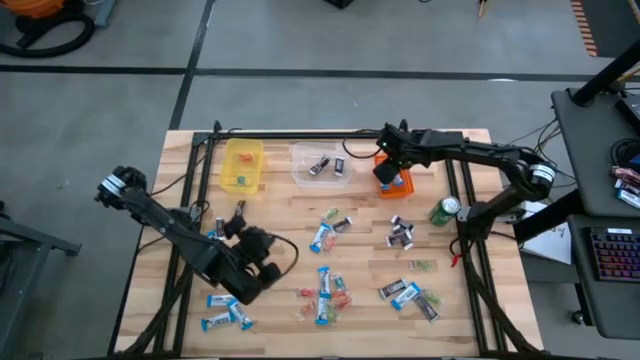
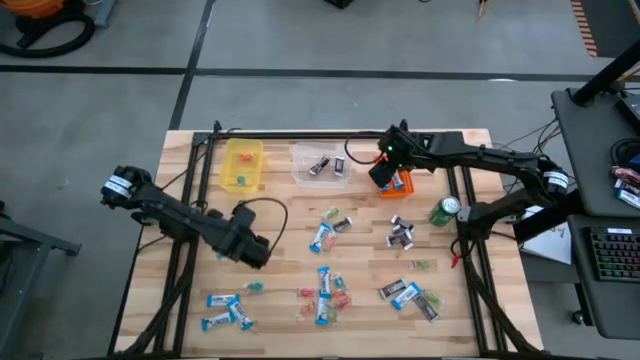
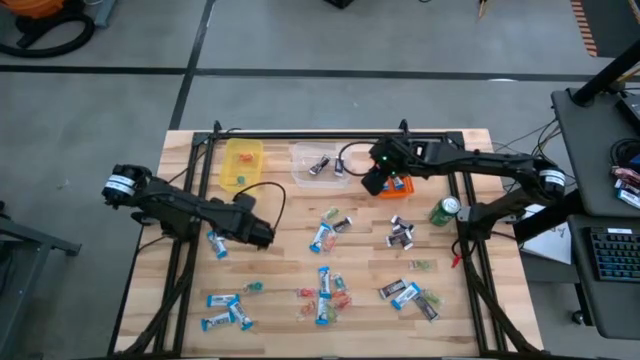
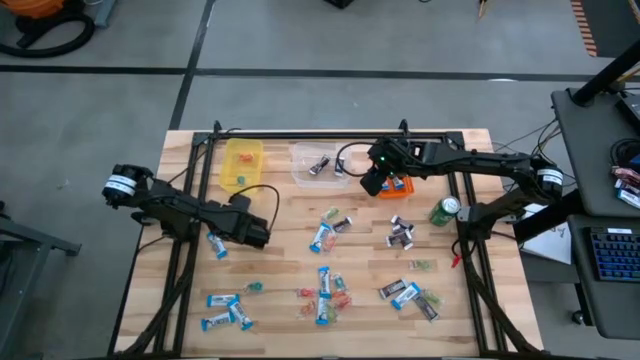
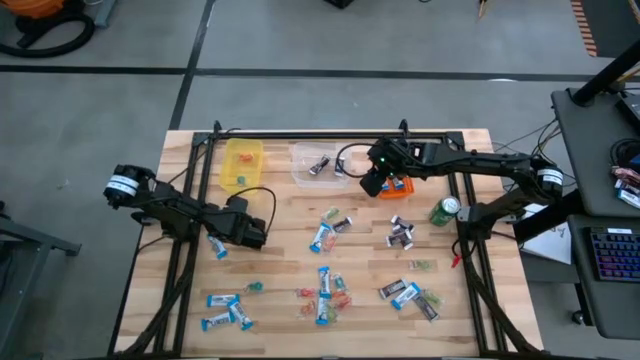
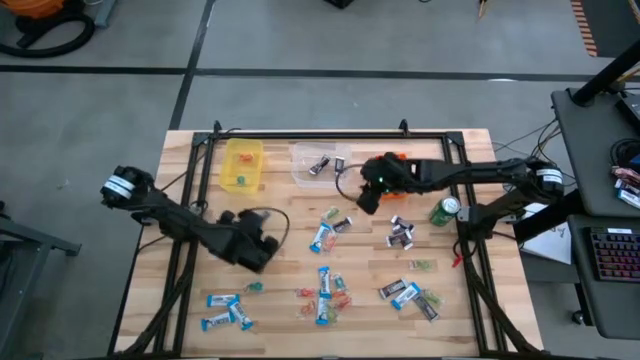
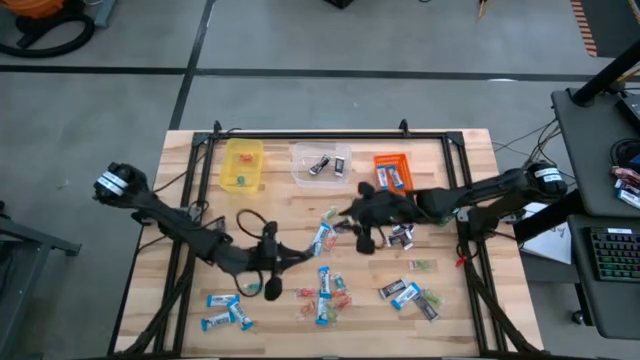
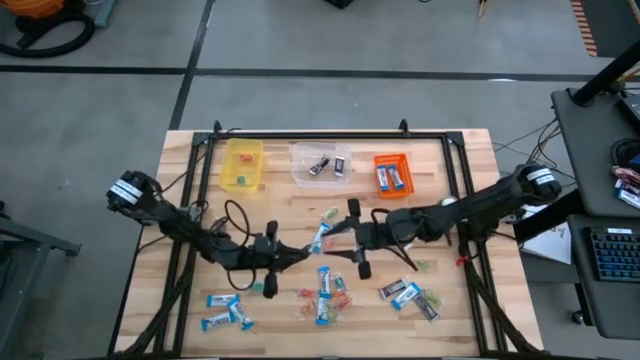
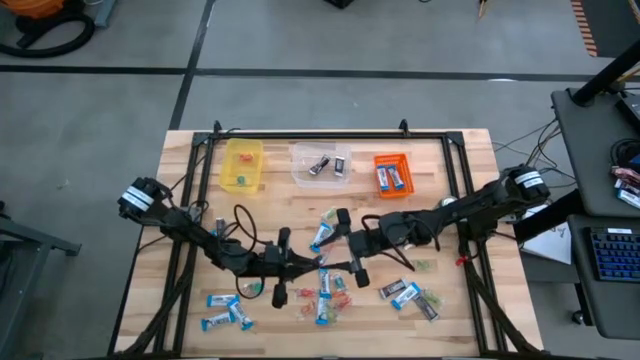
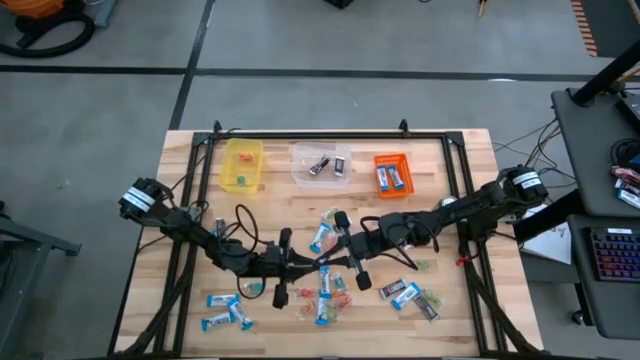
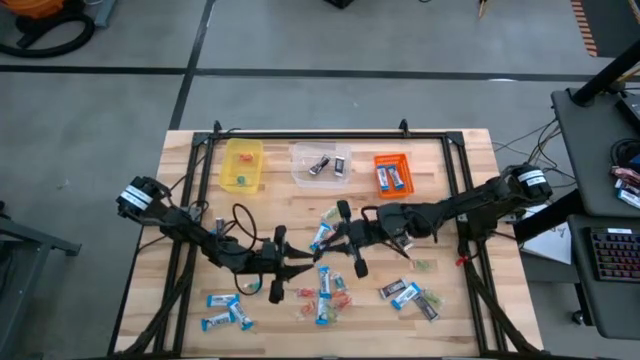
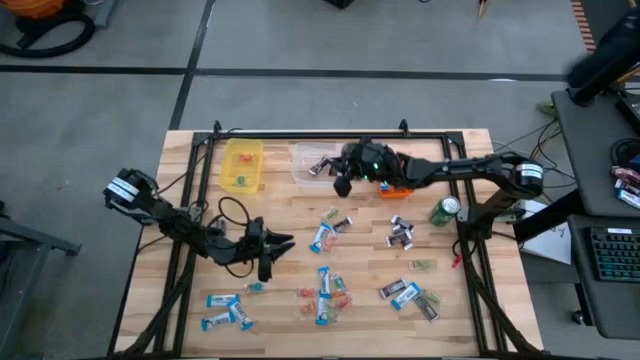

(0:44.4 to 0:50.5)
Task: Organize candy in baskets
Put the brown chocolate bar into the transparent bin

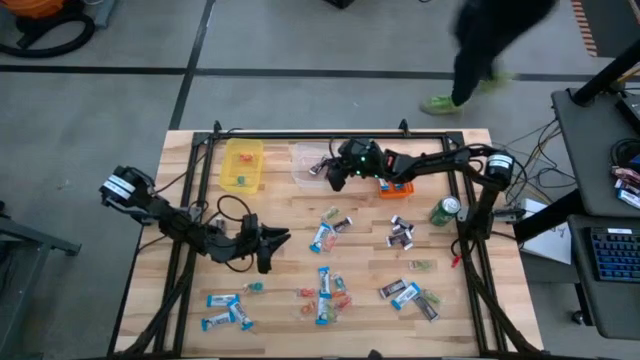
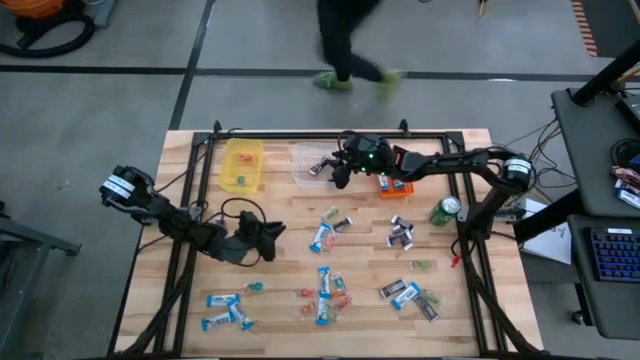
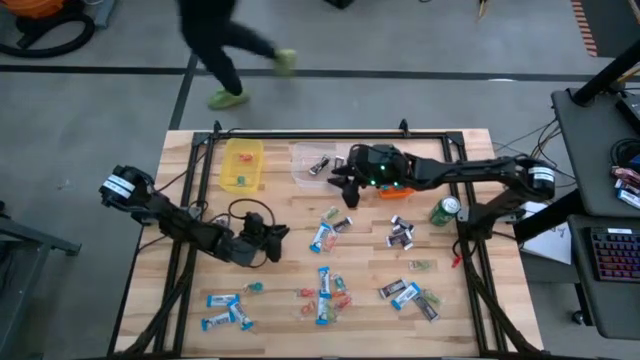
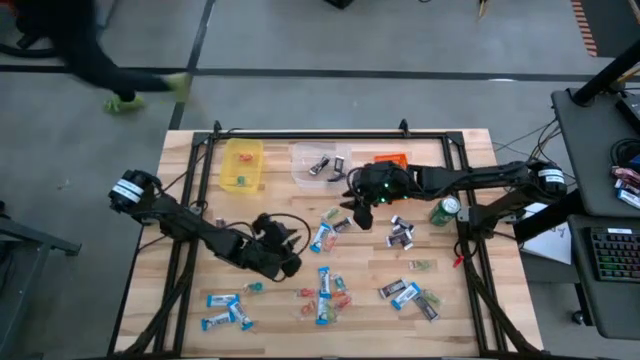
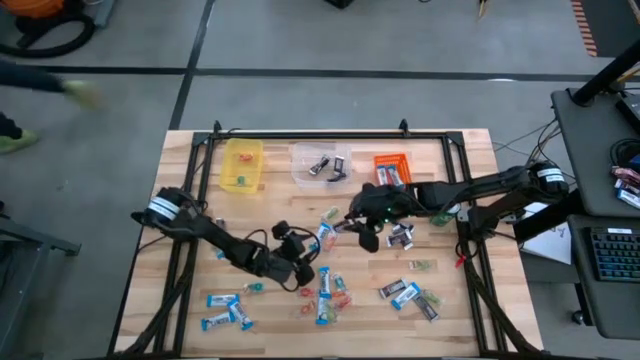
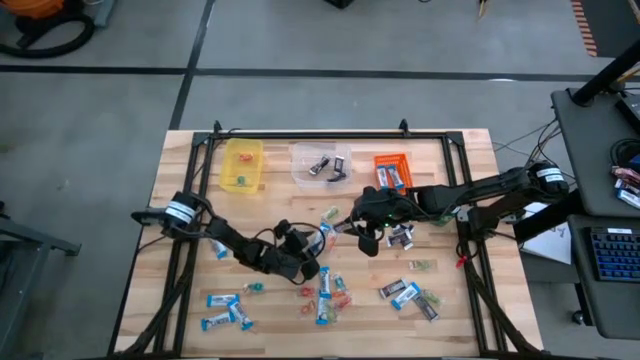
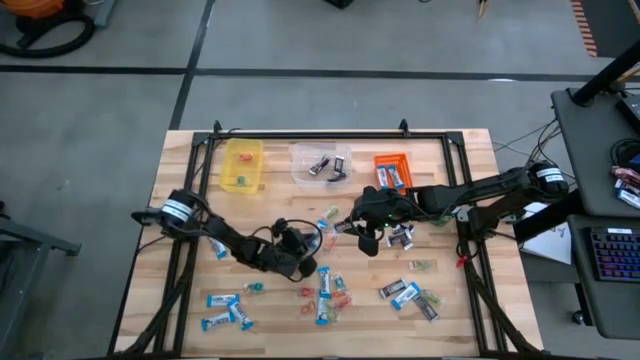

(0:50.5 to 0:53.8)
Put the white chocolate bar chocolate into the orange bin

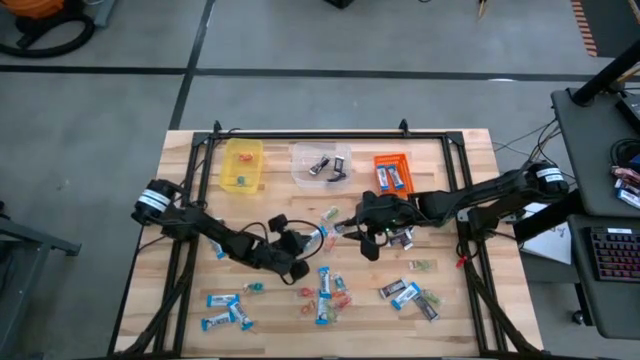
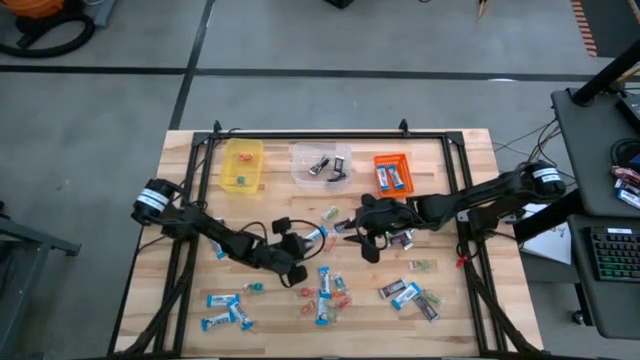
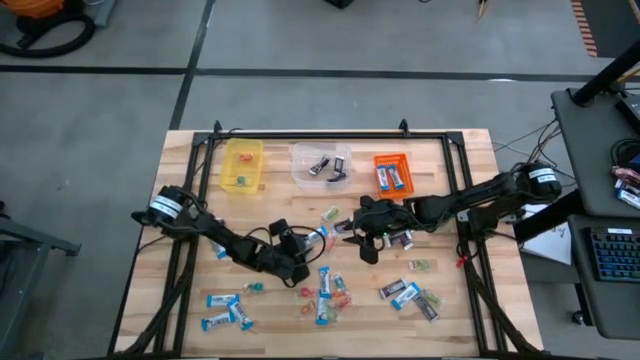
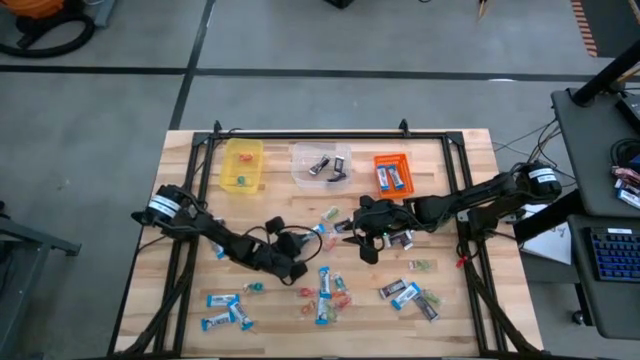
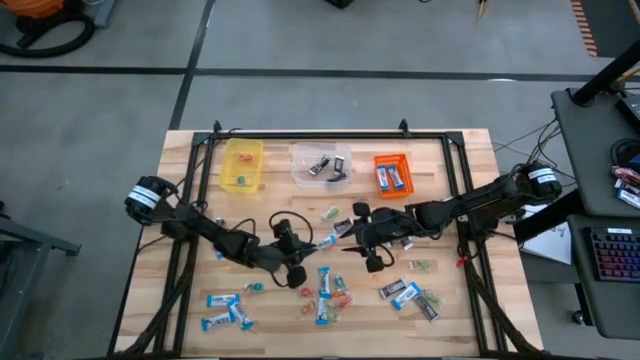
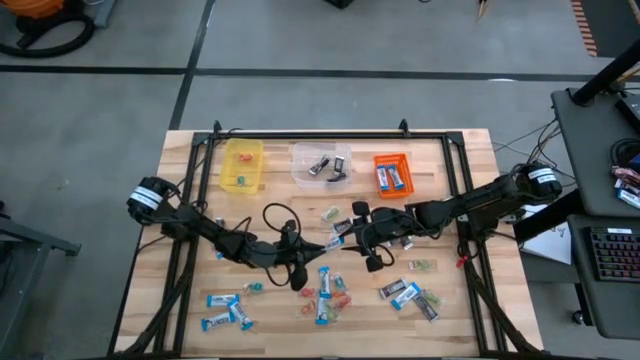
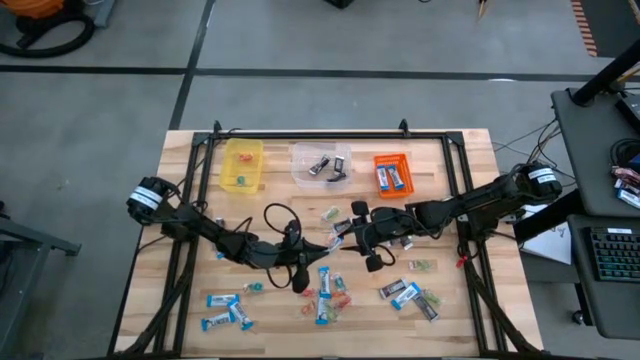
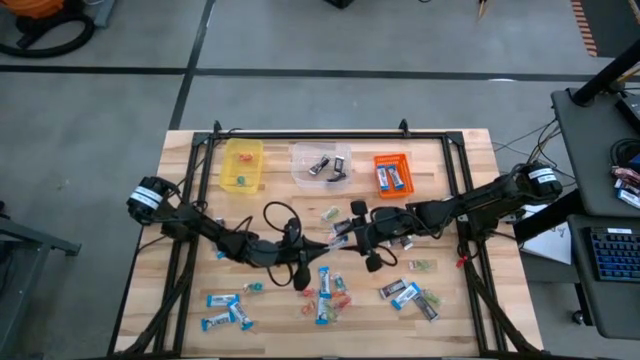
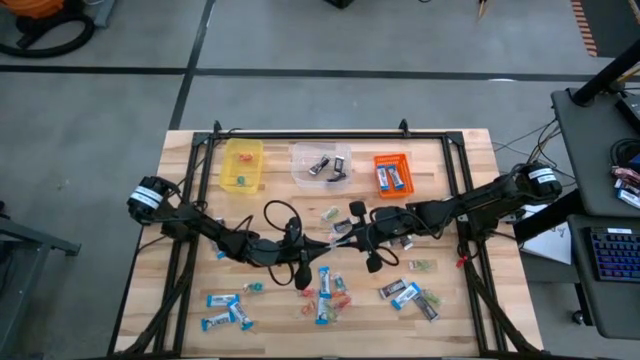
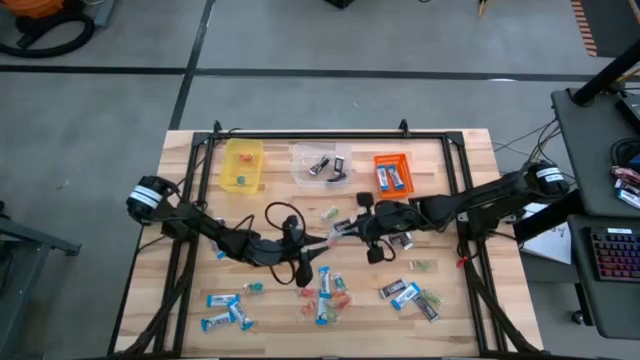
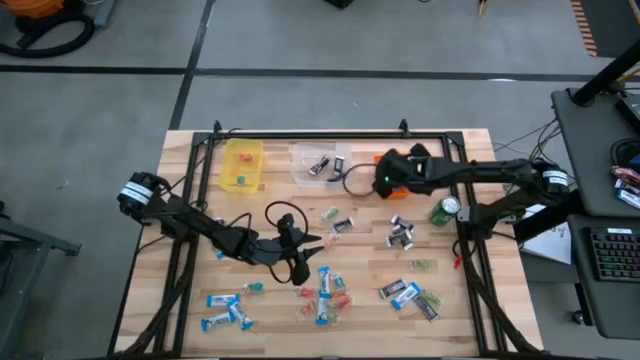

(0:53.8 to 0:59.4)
Put the white chocolate bar chocolate into the orange bin

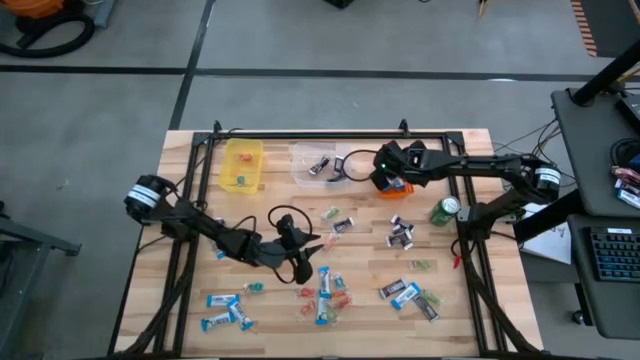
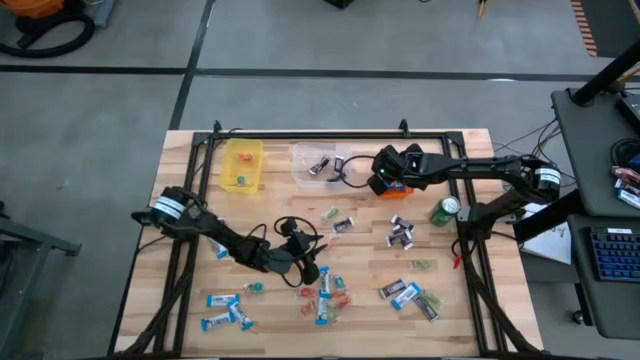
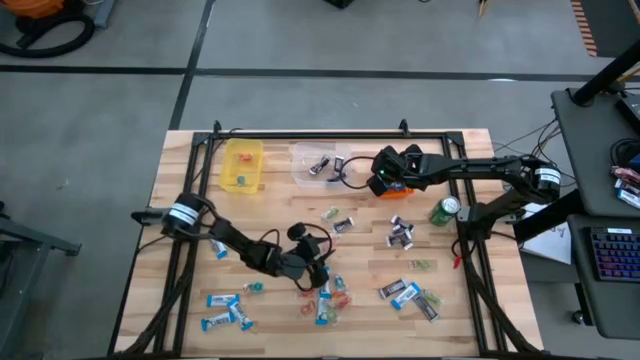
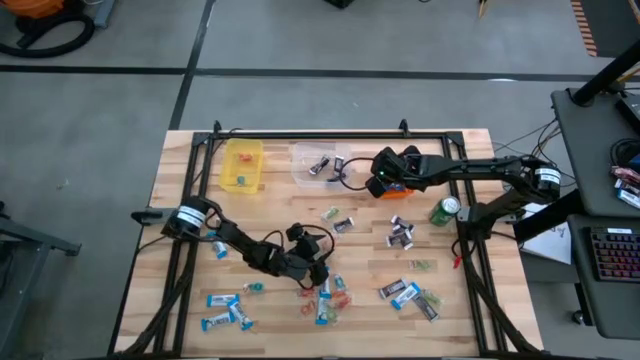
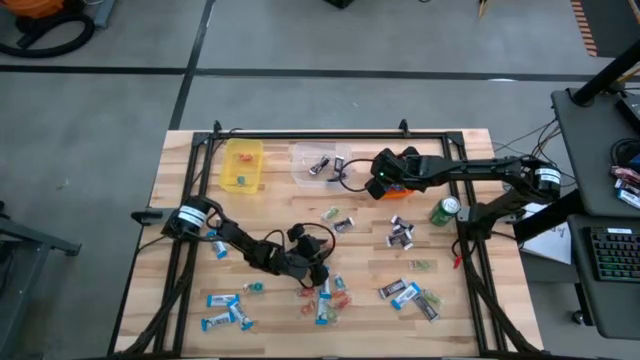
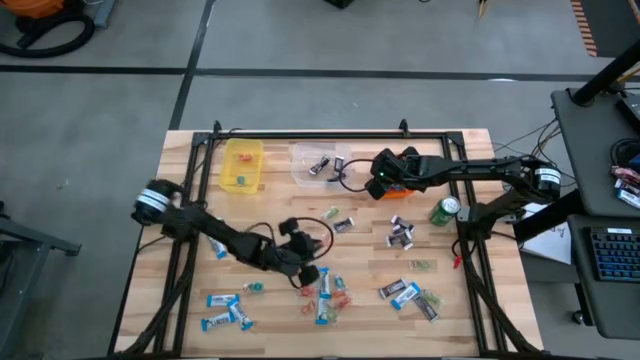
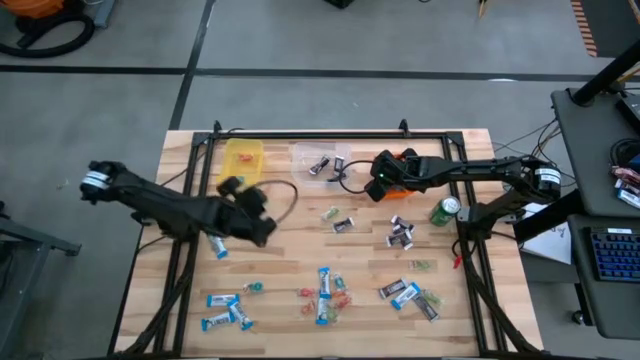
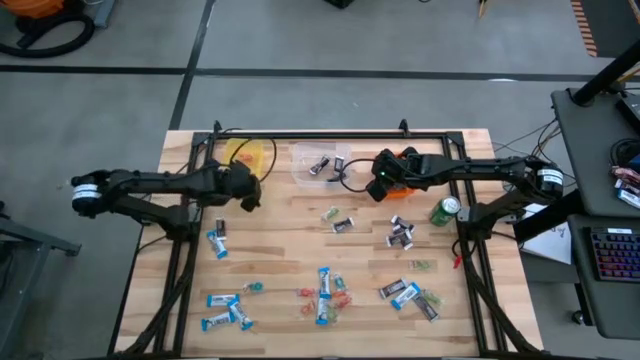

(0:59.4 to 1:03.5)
Put the orange gummy into the yellow bin

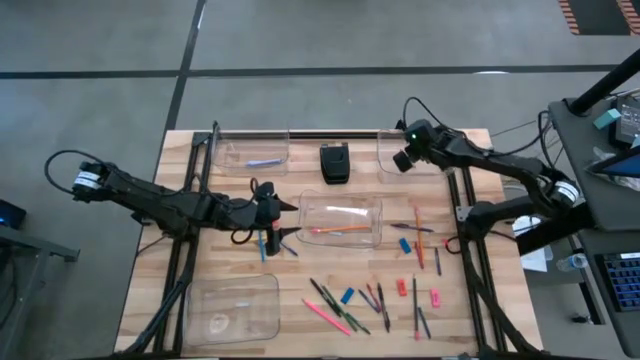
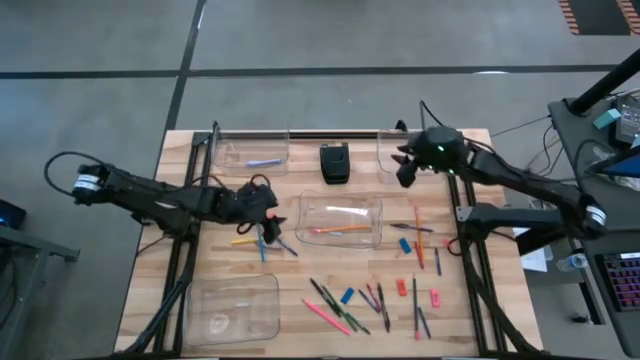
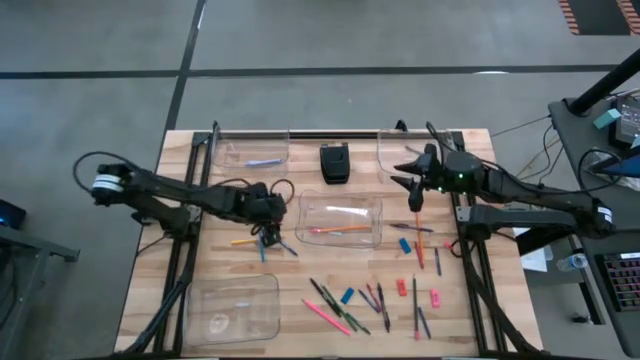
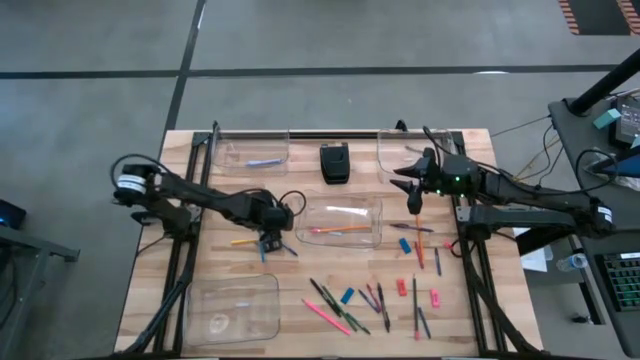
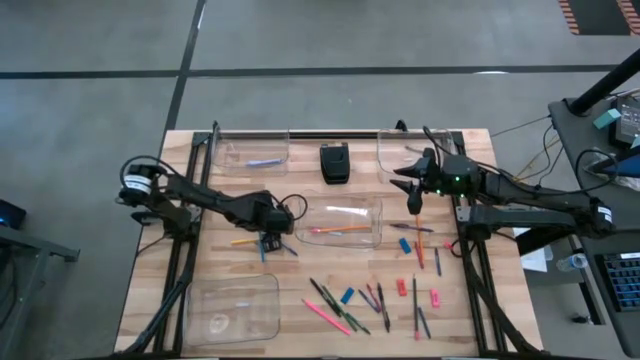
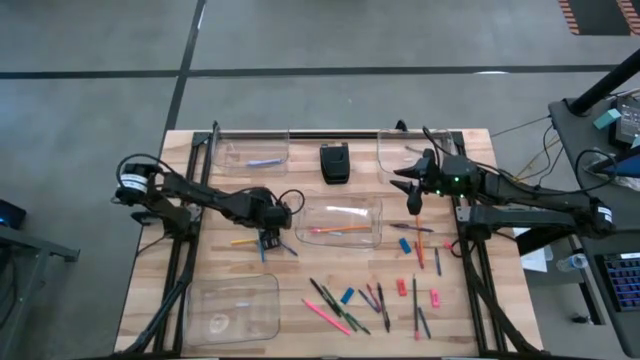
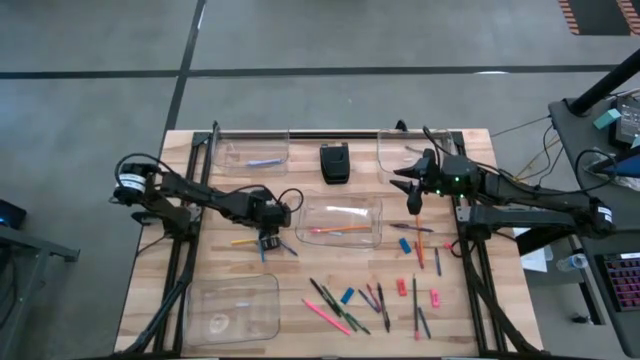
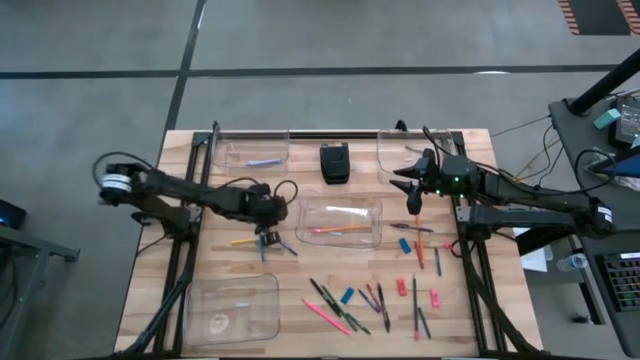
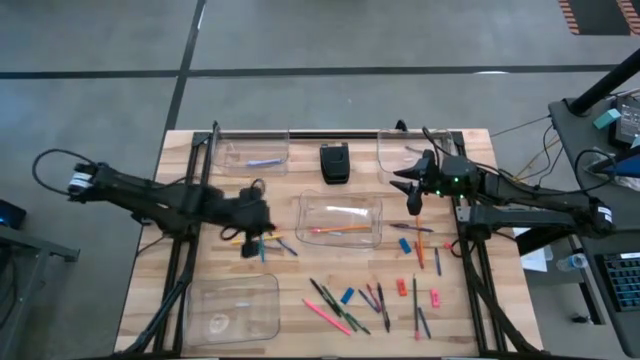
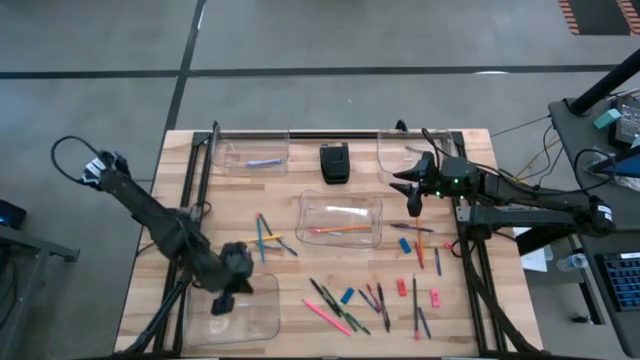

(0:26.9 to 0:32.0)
Task: Sort crayons/erasers/pens/pencils in bins
Put the orange eraser into the bottom left transparent bin
